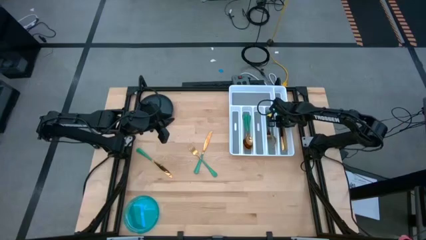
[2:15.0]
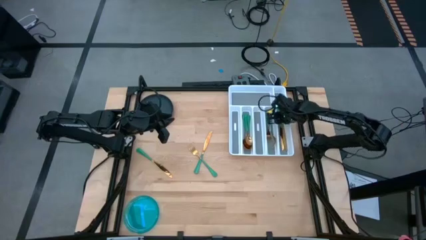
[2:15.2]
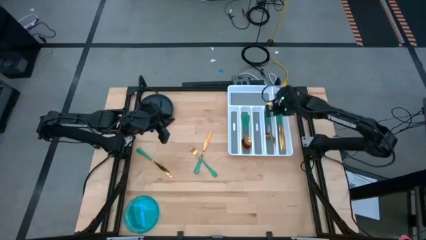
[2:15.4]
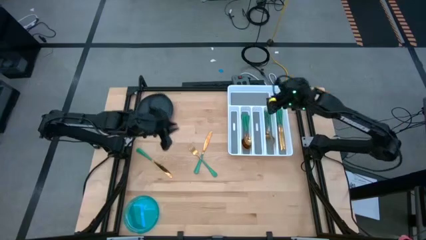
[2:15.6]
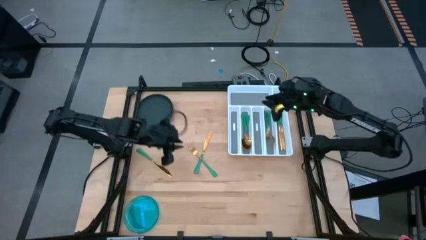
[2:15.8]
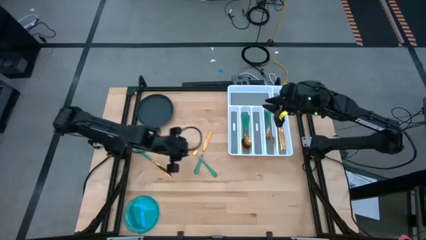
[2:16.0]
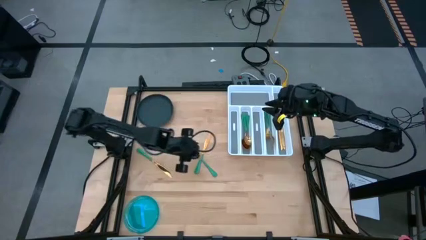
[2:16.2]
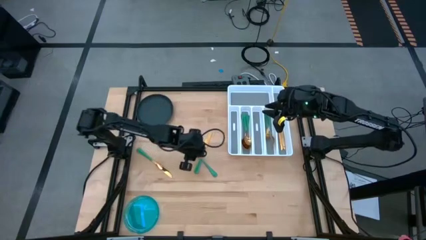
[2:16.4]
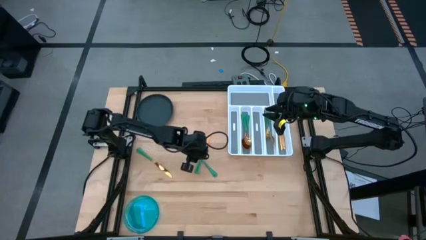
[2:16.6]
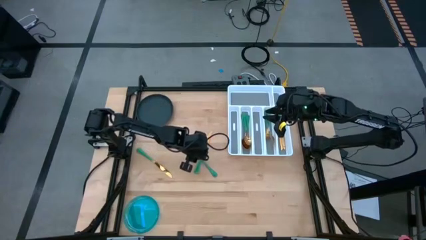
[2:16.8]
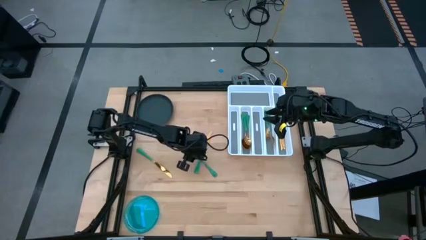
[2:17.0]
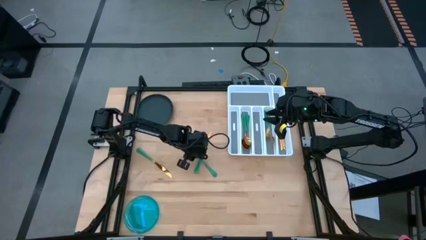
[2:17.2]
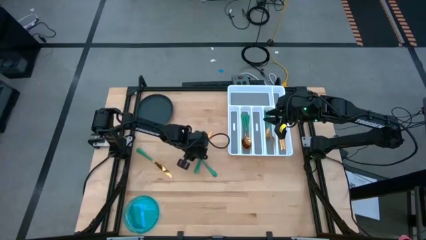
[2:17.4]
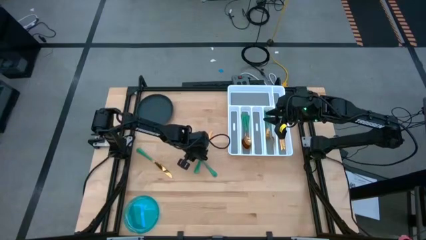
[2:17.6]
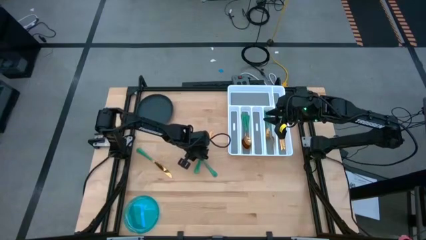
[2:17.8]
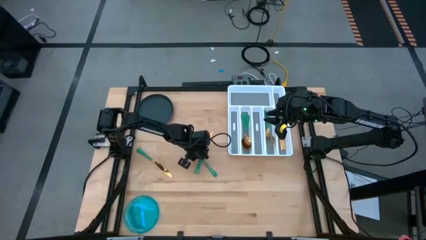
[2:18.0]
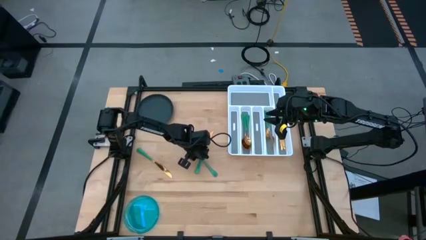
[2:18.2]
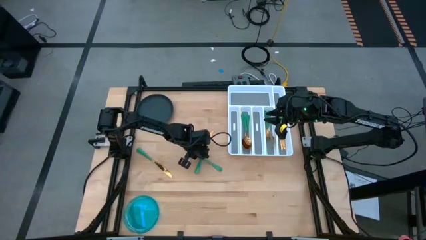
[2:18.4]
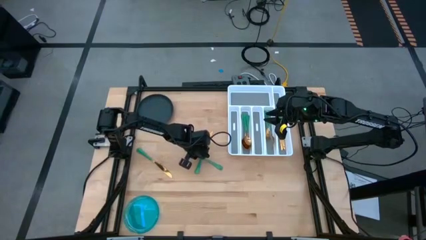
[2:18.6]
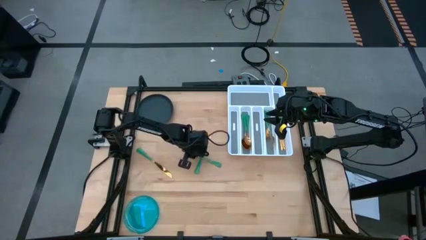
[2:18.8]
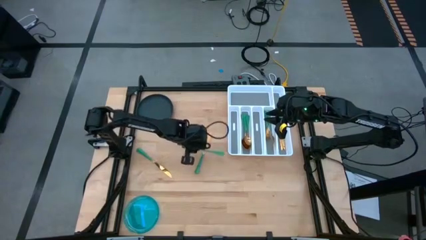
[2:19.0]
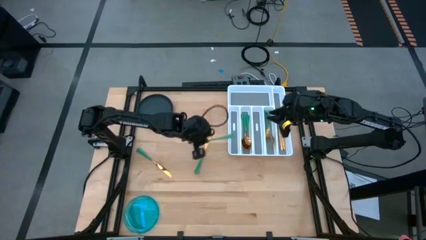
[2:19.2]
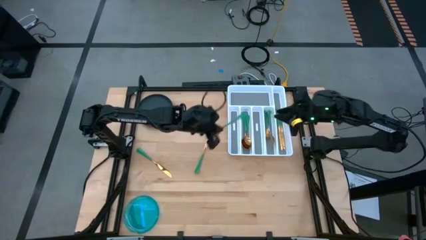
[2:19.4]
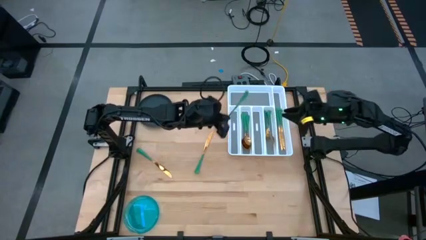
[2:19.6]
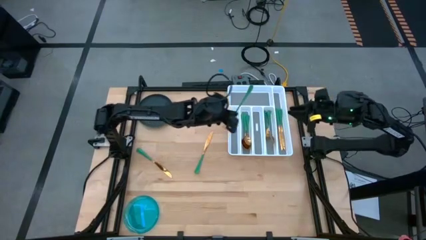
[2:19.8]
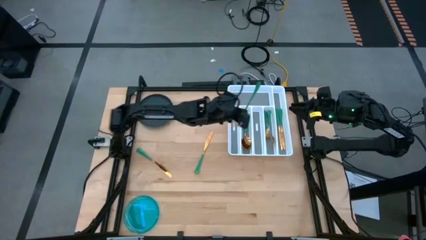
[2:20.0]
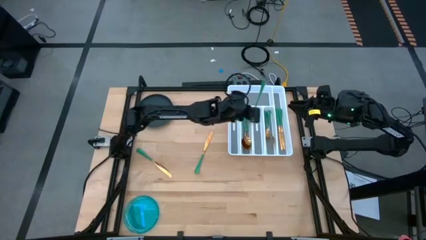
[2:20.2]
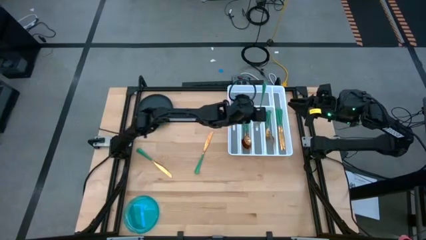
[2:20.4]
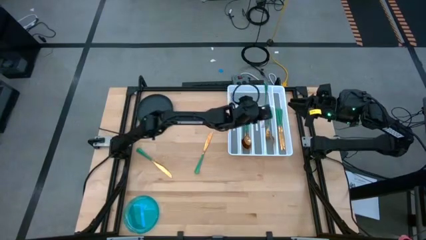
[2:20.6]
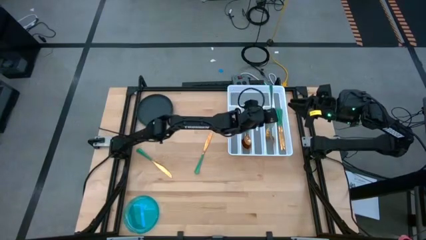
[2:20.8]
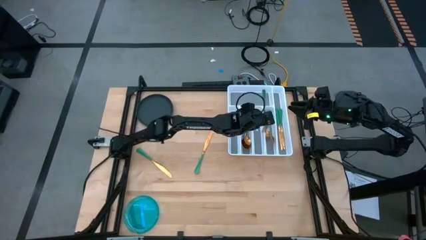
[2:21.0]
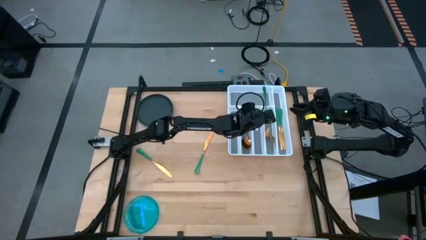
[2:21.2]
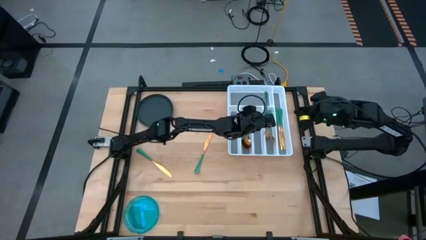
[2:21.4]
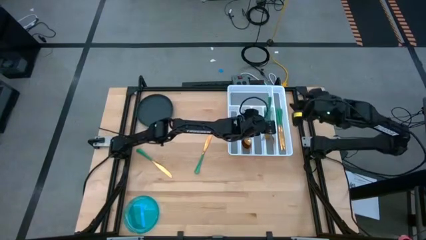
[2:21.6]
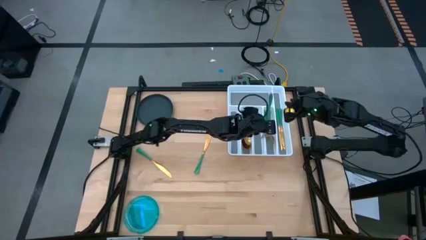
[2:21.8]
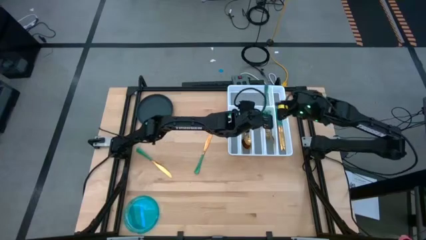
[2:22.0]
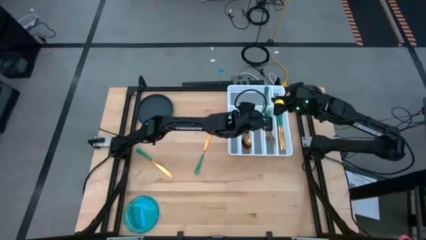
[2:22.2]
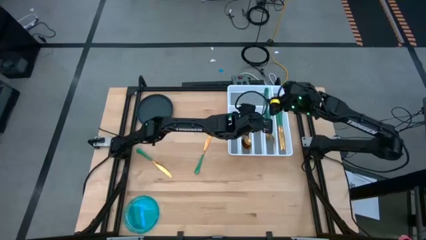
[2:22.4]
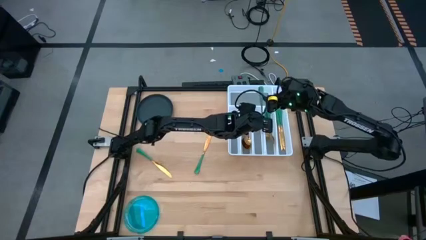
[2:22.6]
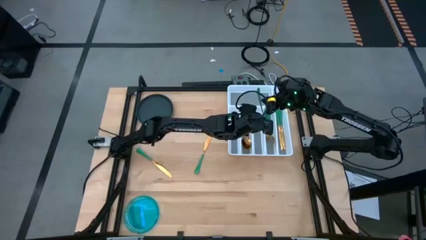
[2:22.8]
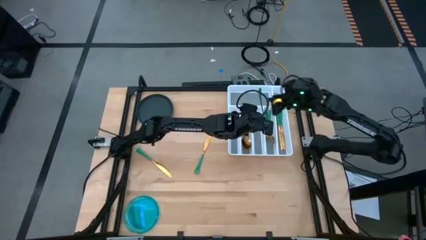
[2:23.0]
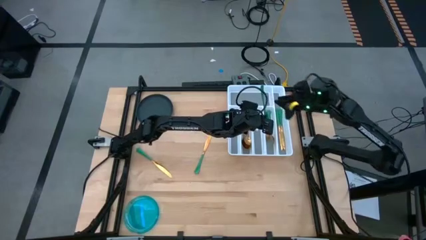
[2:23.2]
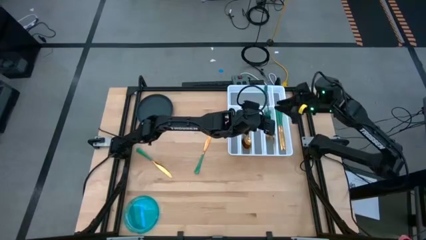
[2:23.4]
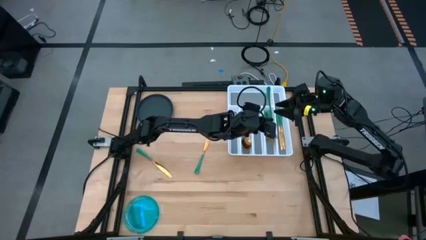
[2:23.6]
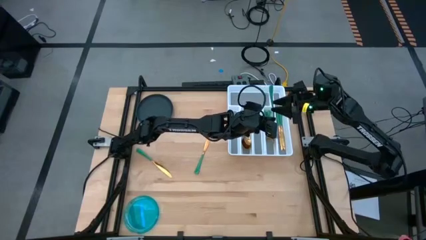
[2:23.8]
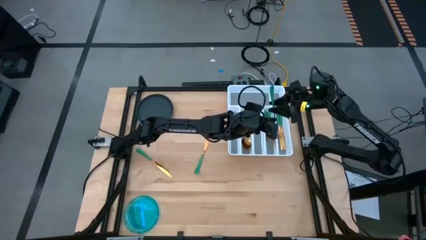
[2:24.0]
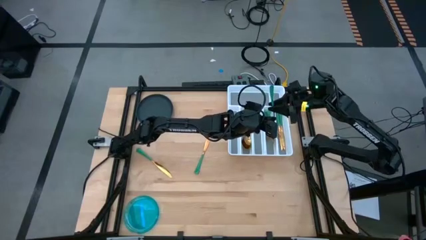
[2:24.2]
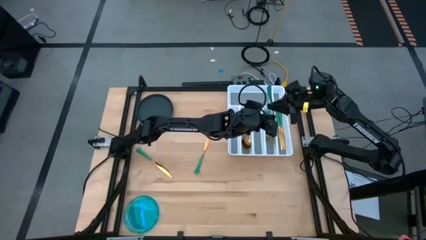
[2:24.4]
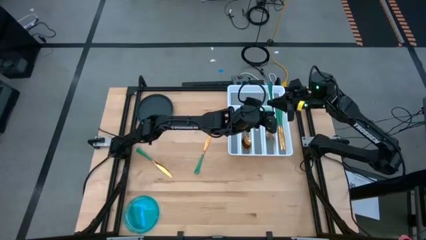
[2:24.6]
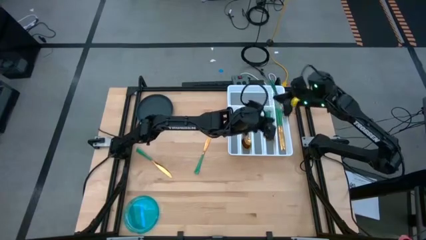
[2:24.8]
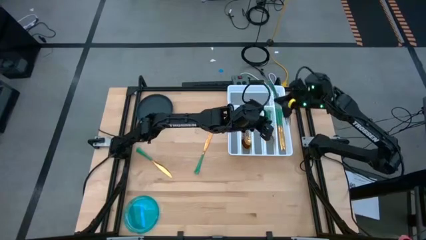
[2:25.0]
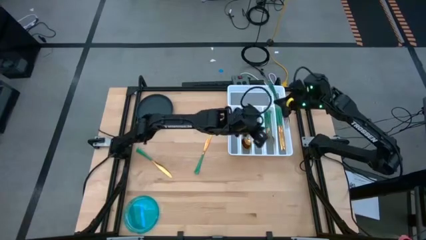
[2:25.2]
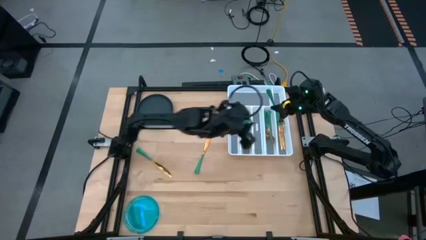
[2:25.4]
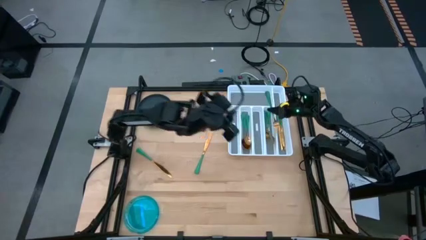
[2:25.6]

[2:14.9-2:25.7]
Task: Sort silverware
Put the green fork into the silverware tray
